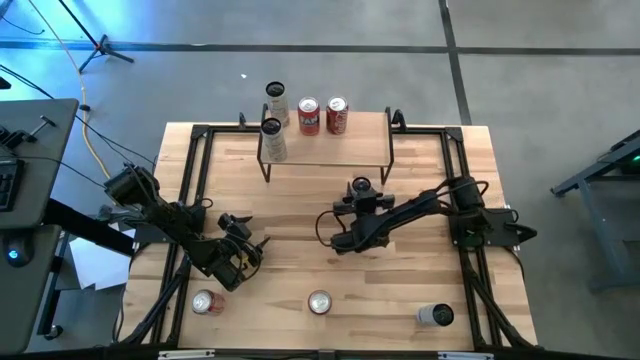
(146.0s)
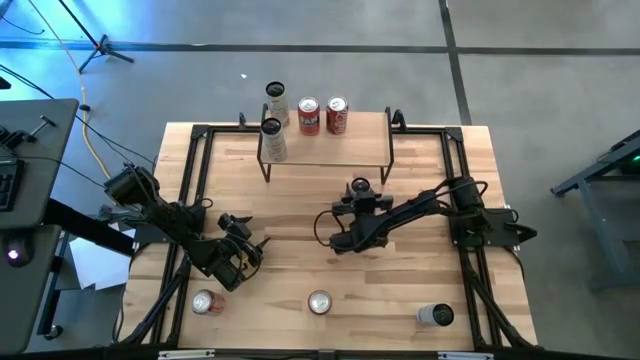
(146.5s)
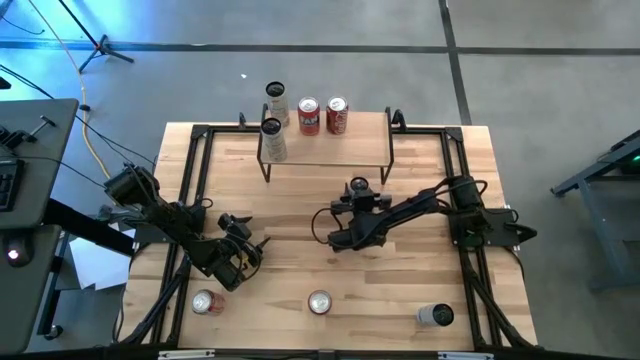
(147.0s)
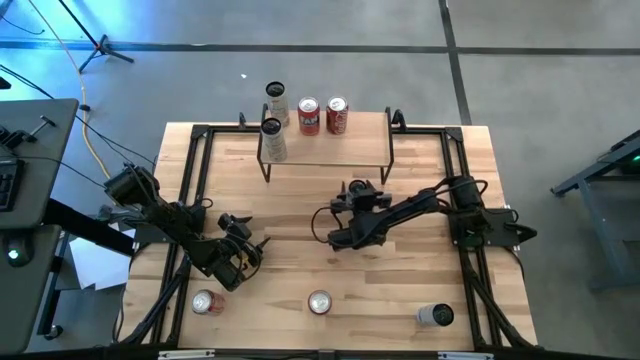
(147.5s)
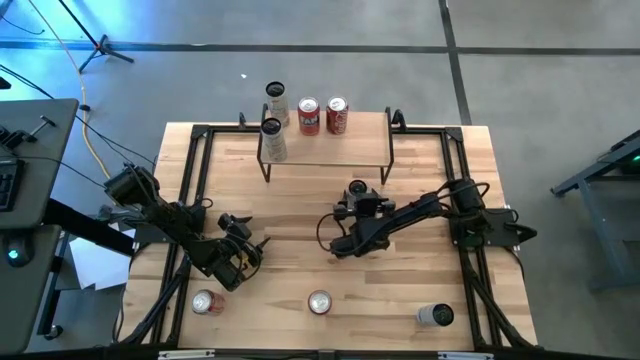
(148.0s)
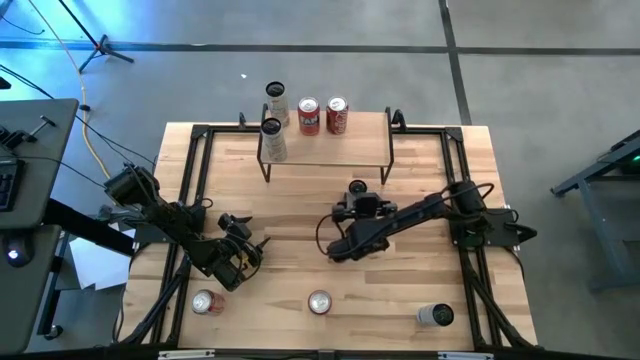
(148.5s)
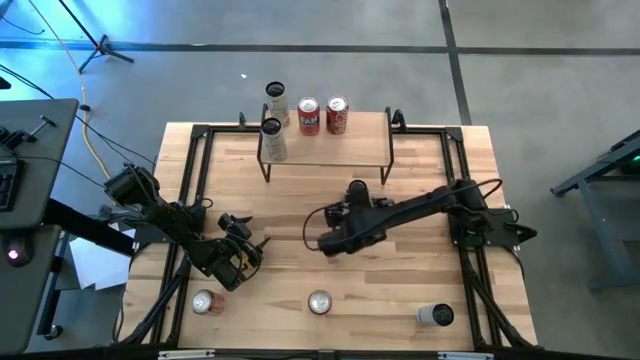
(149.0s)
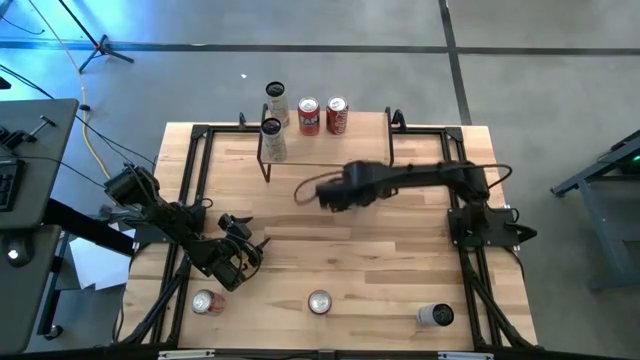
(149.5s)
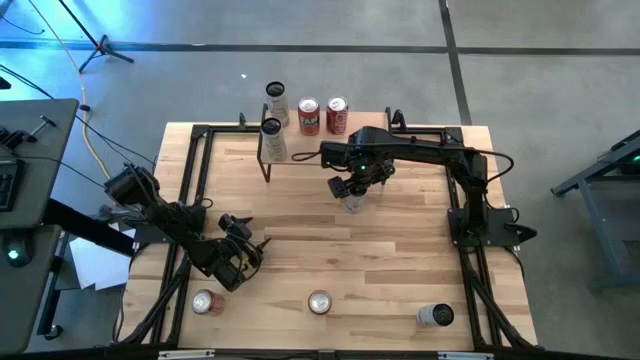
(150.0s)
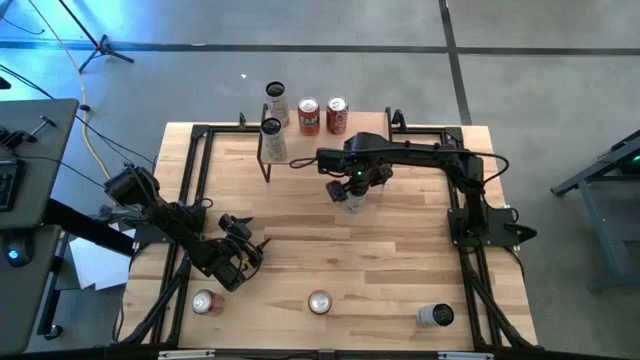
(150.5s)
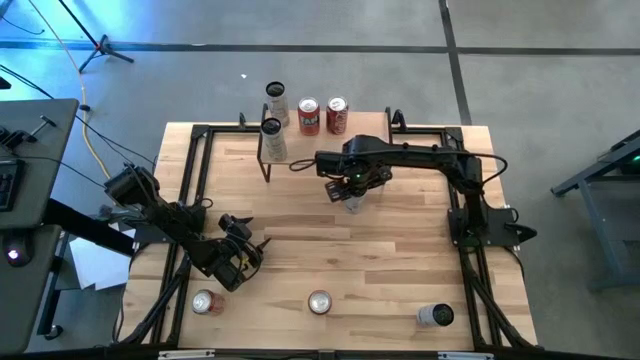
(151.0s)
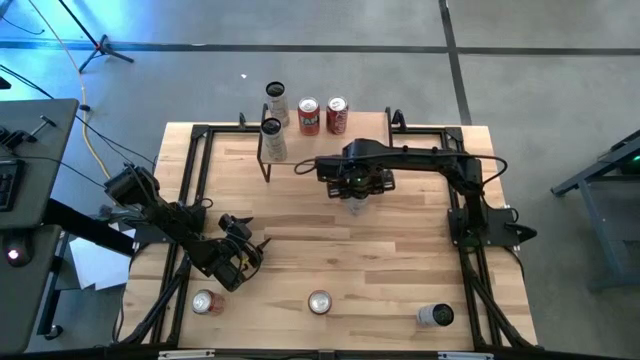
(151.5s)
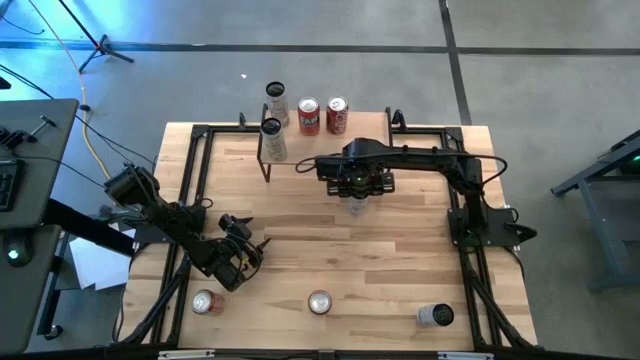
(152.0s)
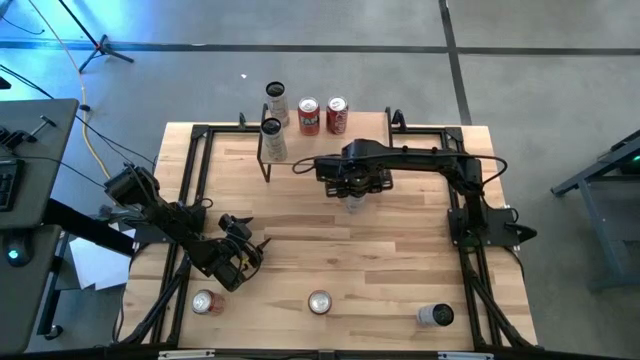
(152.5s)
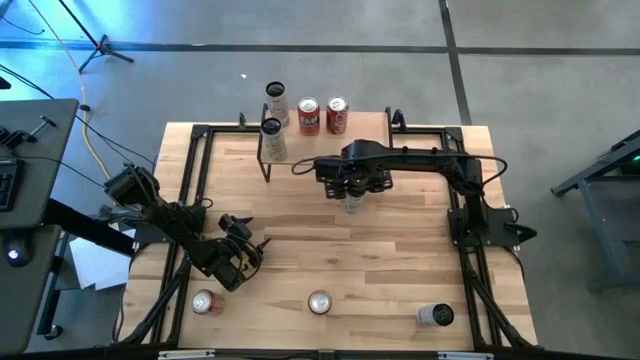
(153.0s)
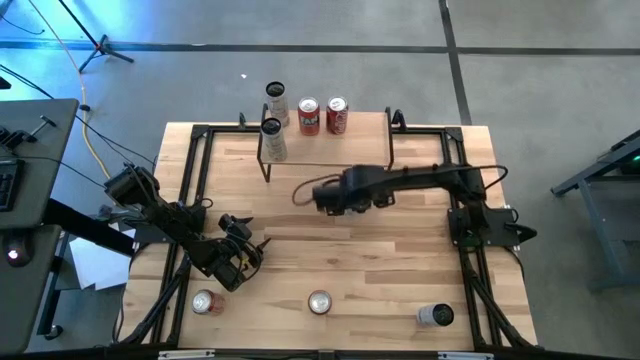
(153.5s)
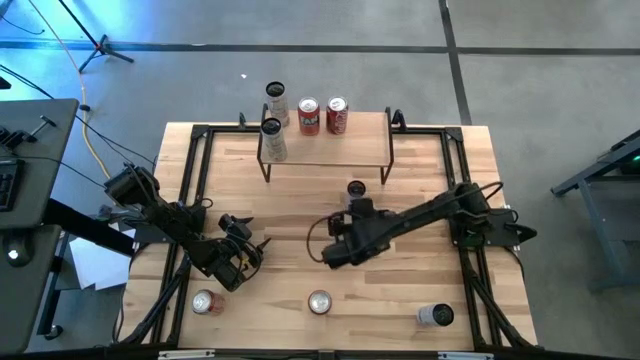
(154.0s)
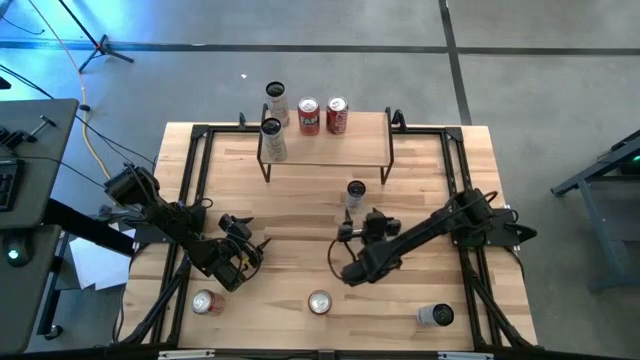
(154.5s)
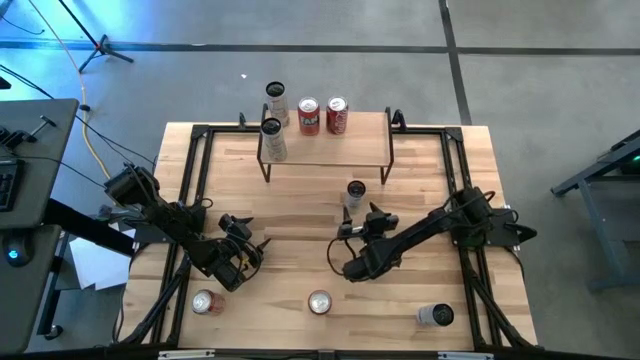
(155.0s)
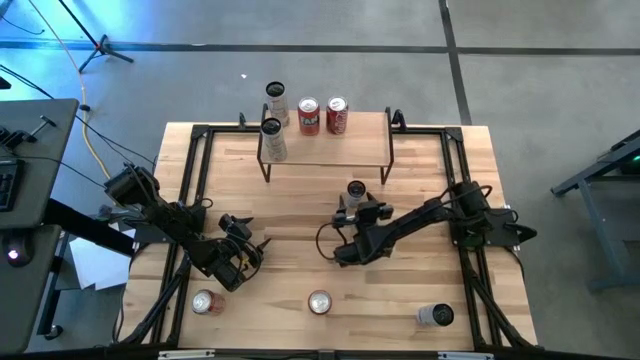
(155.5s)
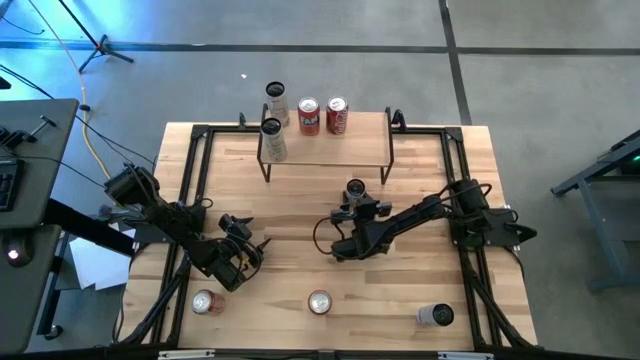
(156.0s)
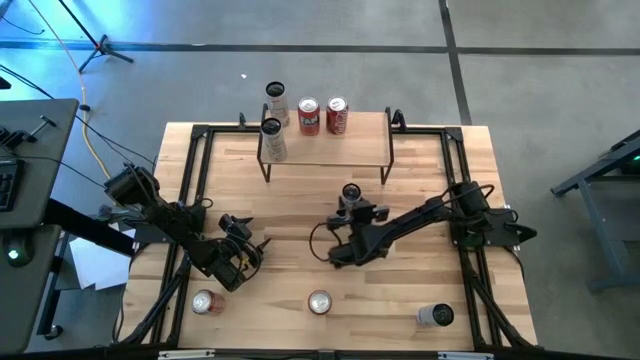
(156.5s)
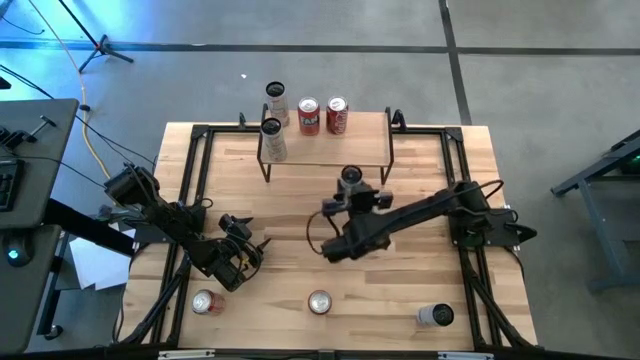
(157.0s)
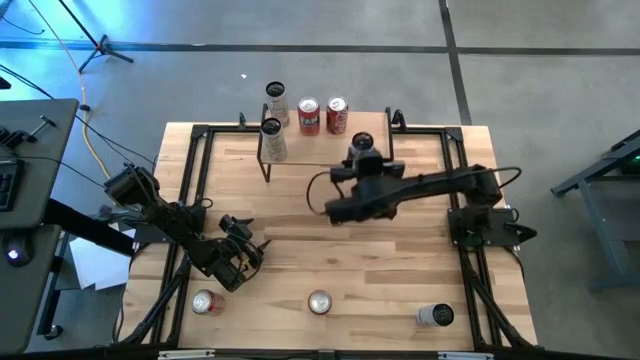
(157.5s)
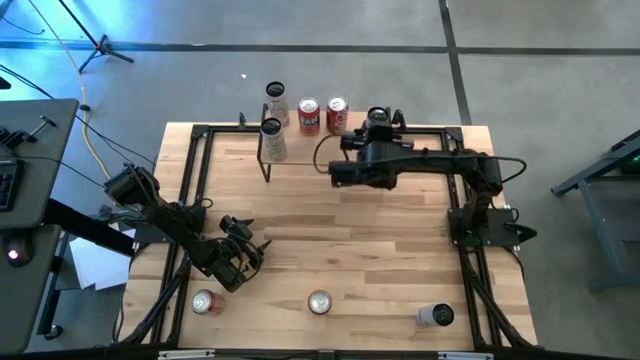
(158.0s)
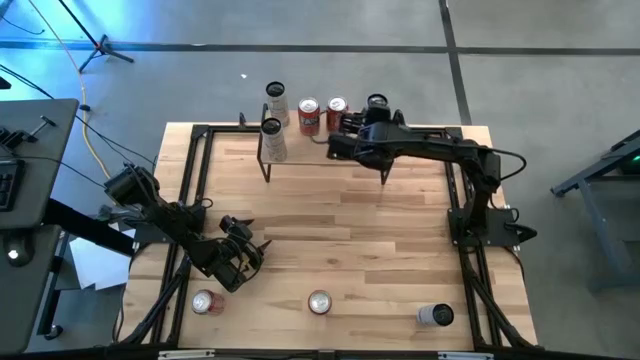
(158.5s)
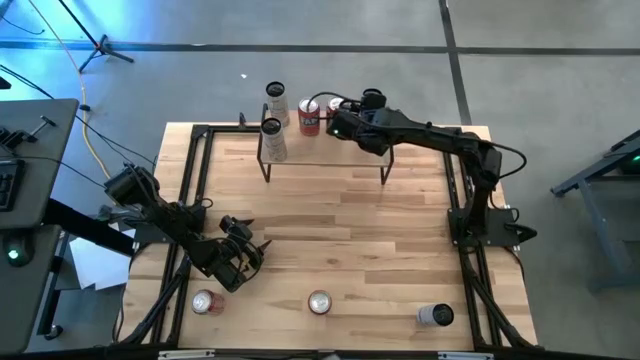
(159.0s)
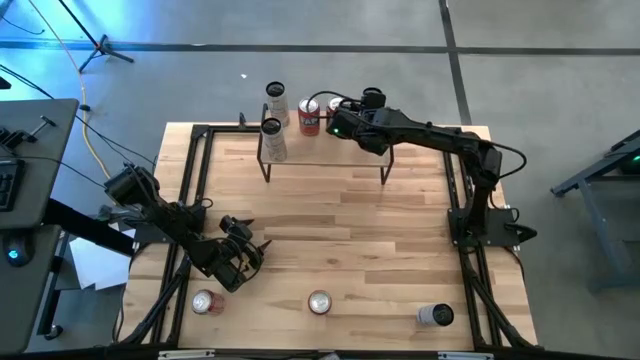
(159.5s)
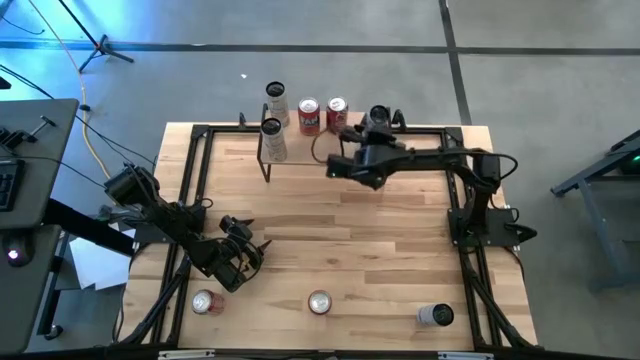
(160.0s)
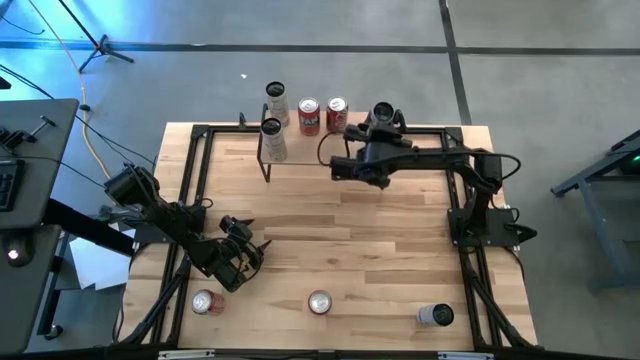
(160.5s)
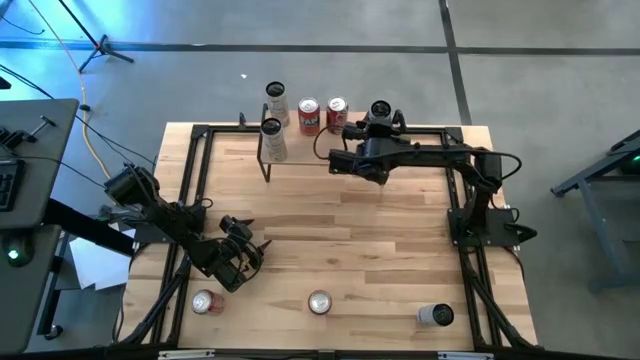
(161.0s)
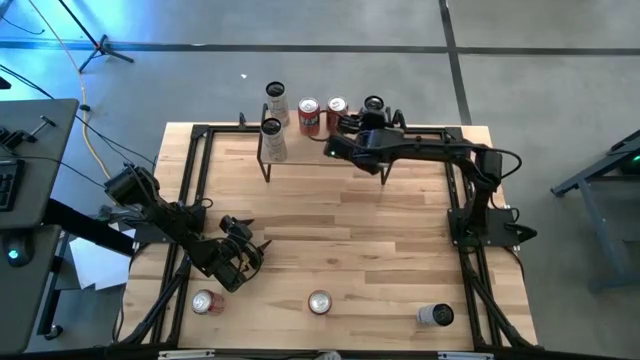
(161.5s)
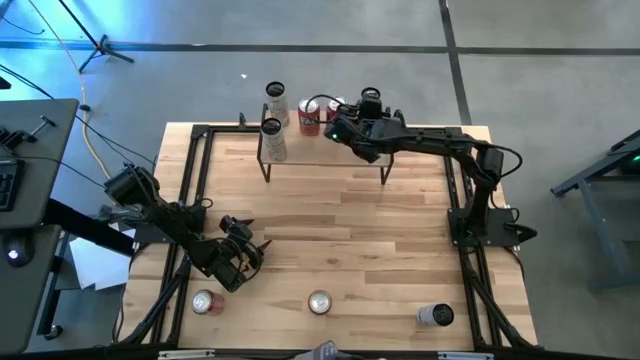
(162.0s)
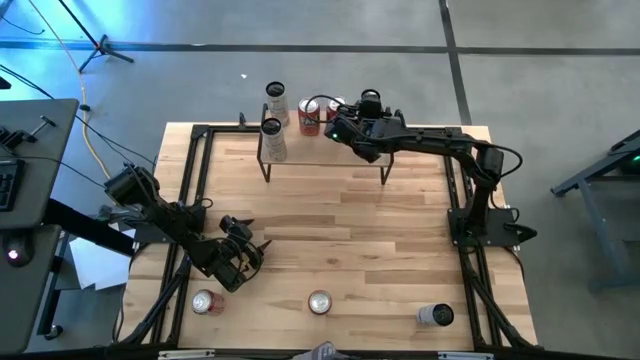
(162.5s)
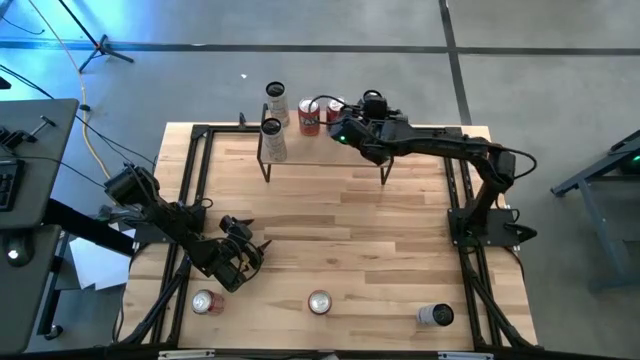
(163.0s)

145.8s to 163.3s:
Task: Place canned beverage on shelf
Put the white and blue soda can on the shelf

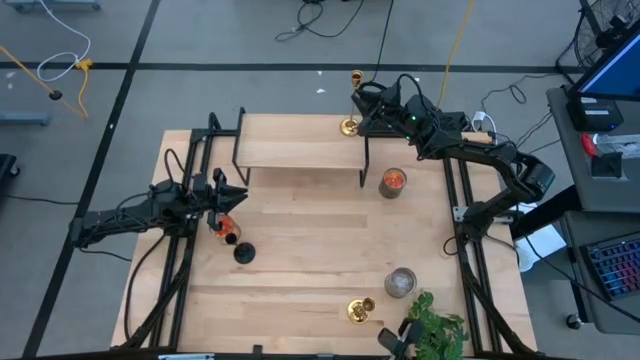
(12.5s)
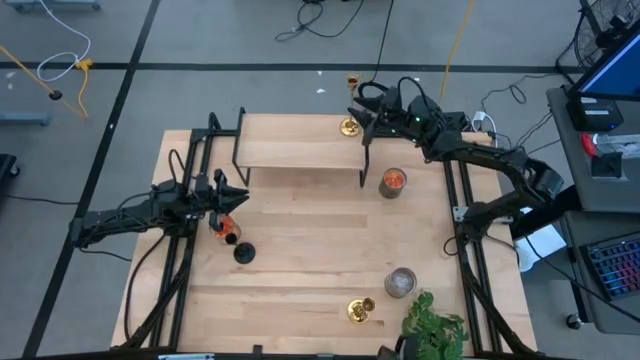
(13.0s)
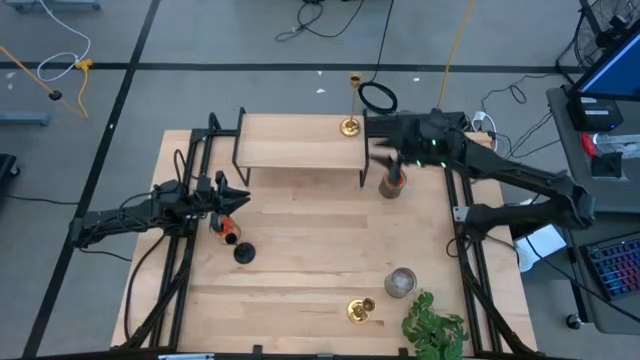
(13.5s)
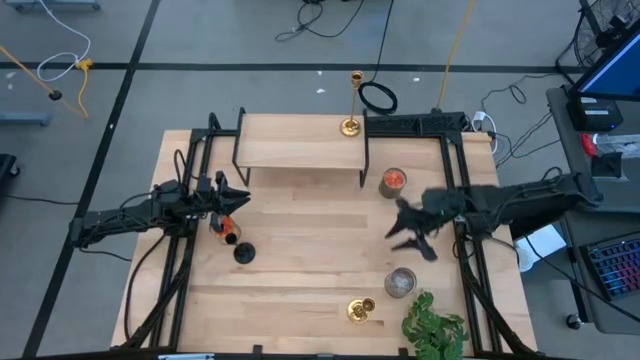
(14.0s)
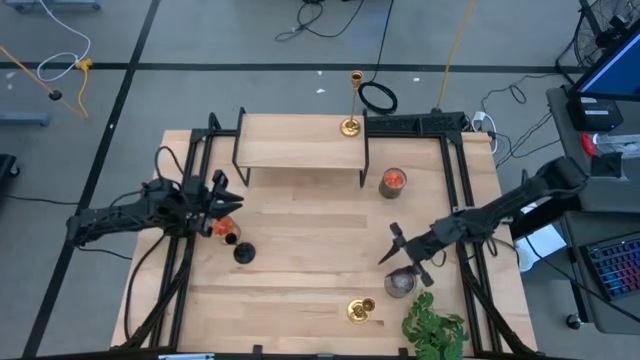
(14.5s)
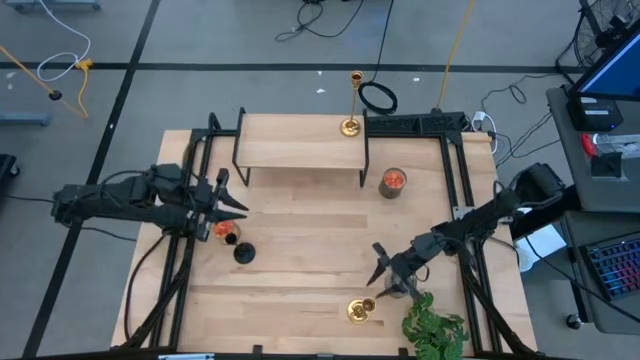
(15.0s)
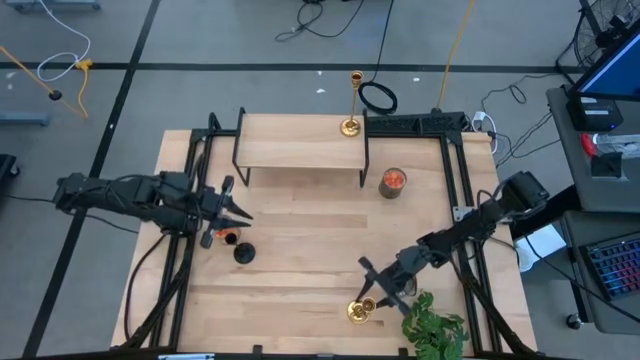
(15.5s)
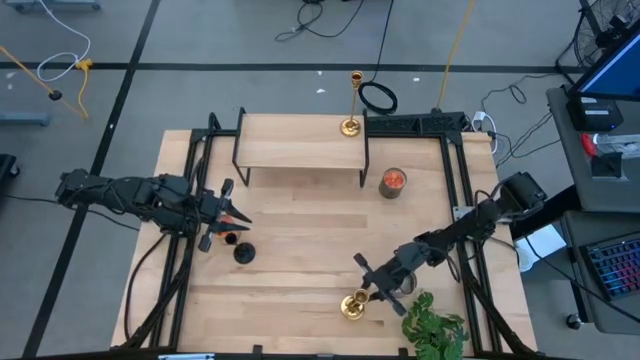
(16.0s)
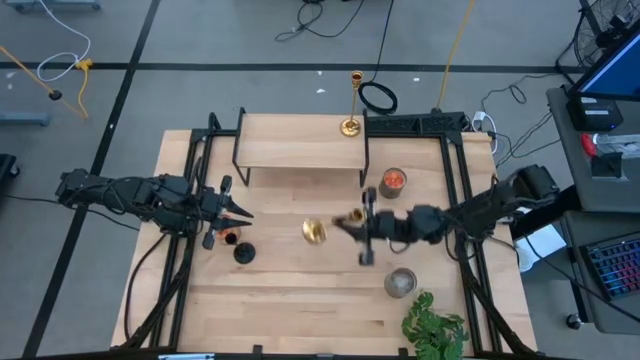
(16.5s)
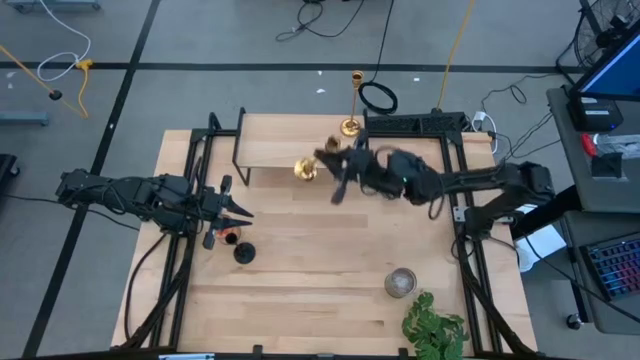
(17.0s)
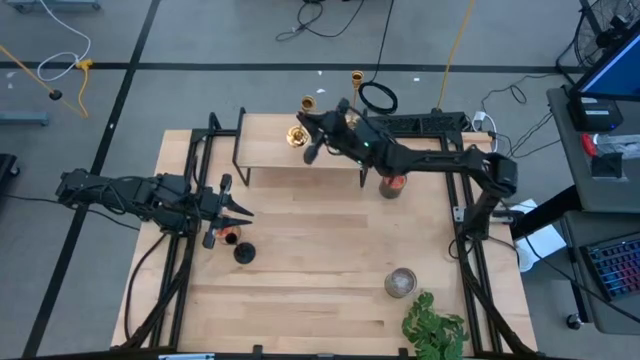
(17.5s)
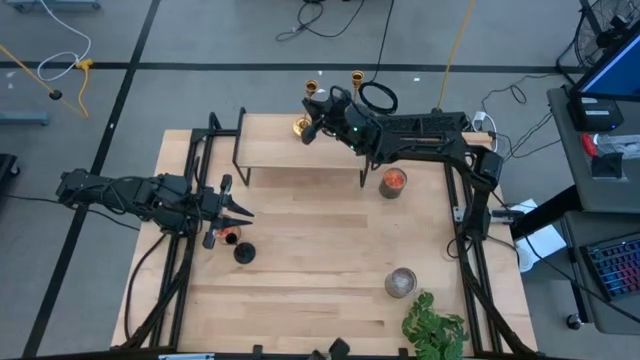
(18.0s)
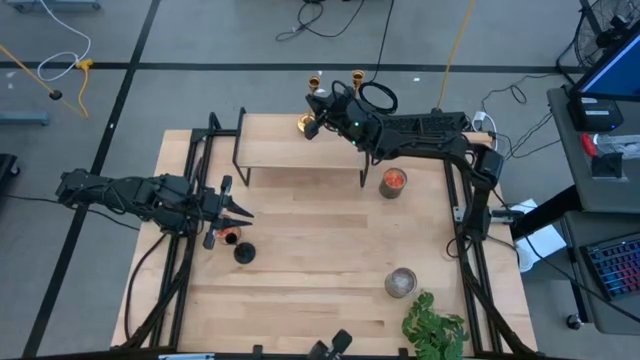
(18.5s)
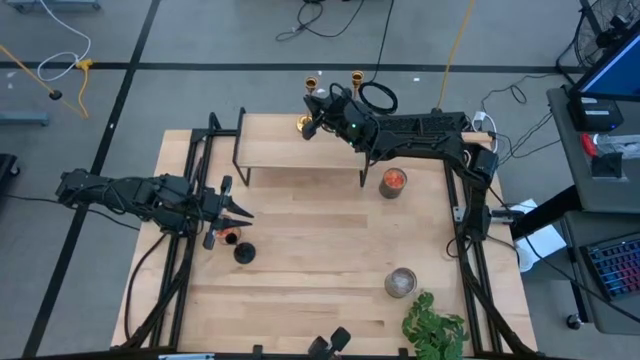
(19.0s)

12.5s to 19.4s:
Task: Pick & Place candle stick holders
Put the gold candle holder on the shelf
